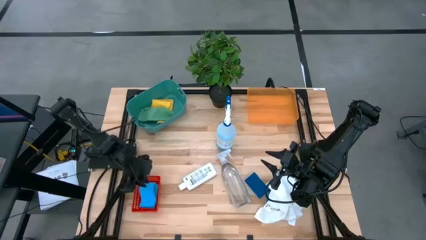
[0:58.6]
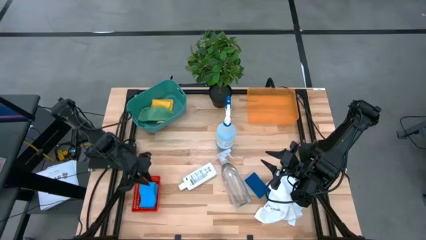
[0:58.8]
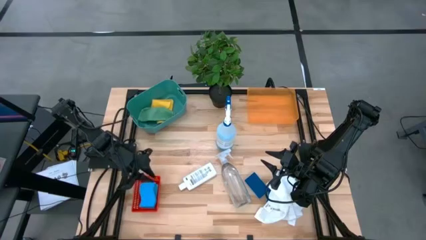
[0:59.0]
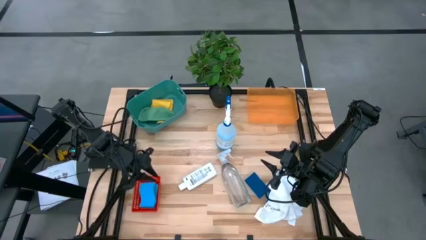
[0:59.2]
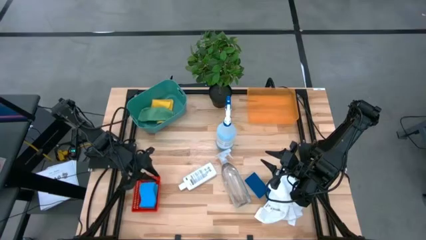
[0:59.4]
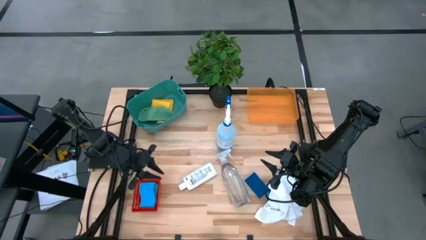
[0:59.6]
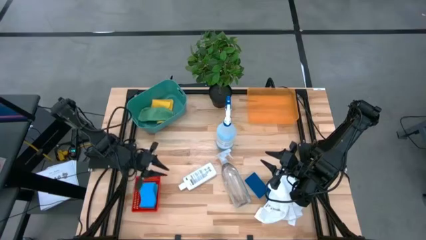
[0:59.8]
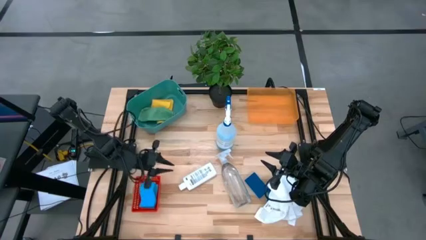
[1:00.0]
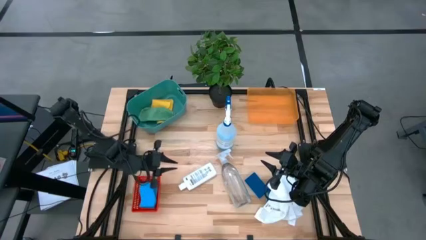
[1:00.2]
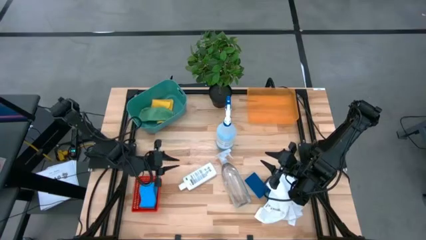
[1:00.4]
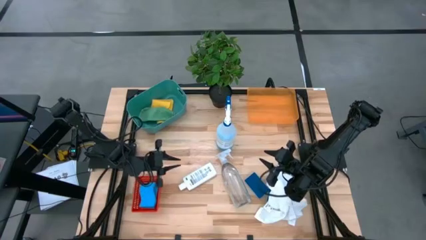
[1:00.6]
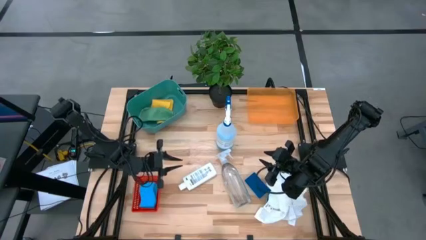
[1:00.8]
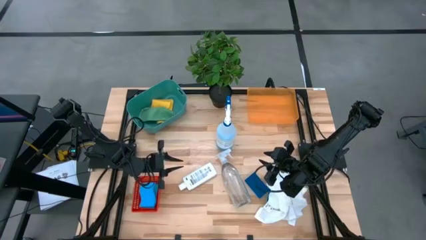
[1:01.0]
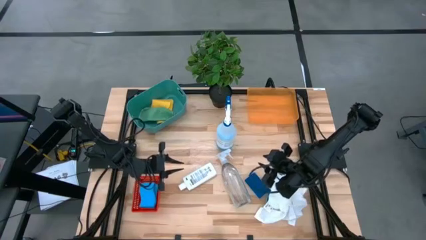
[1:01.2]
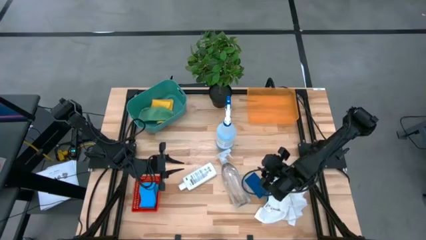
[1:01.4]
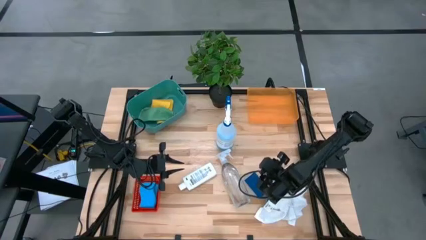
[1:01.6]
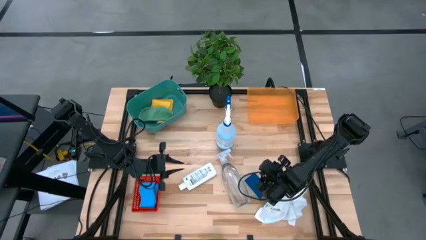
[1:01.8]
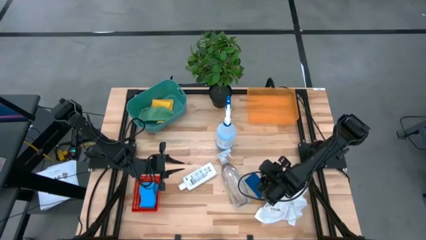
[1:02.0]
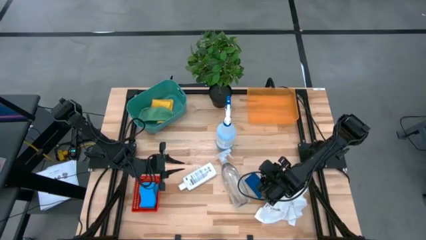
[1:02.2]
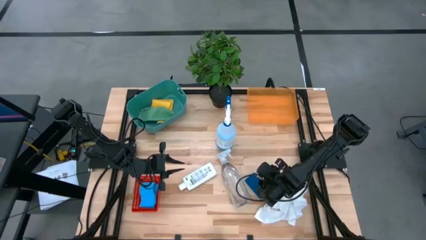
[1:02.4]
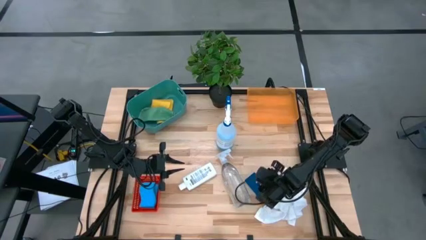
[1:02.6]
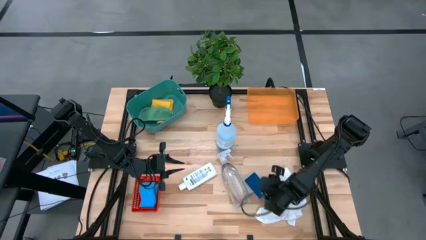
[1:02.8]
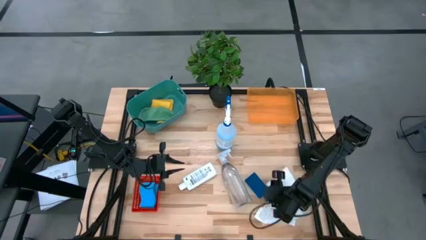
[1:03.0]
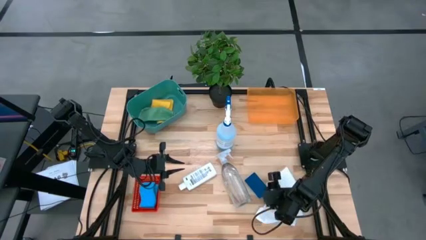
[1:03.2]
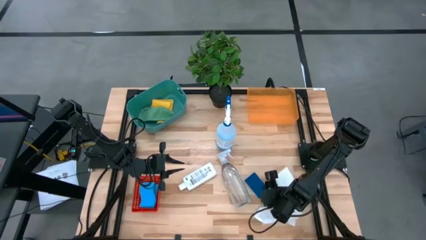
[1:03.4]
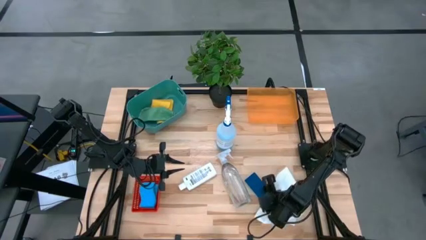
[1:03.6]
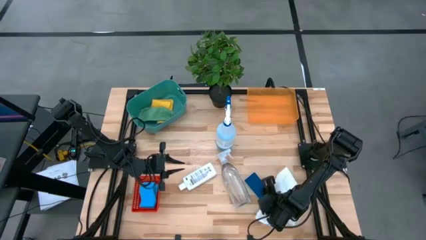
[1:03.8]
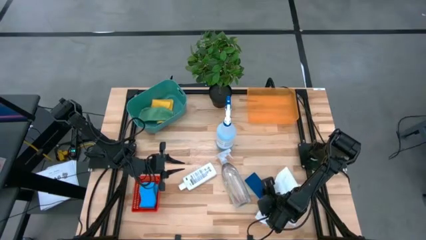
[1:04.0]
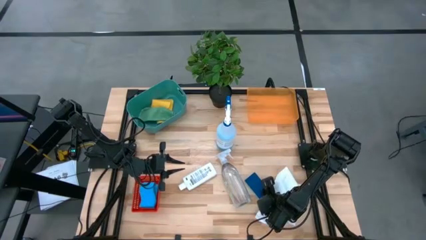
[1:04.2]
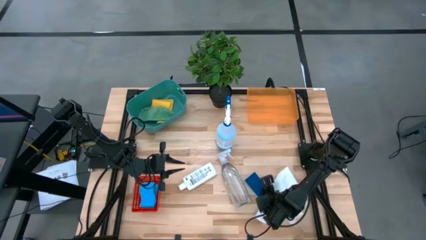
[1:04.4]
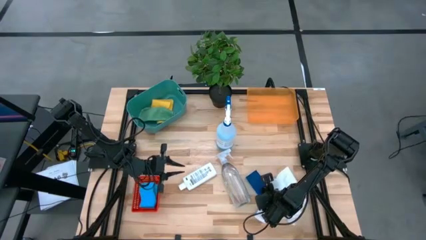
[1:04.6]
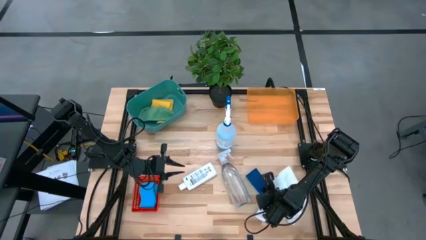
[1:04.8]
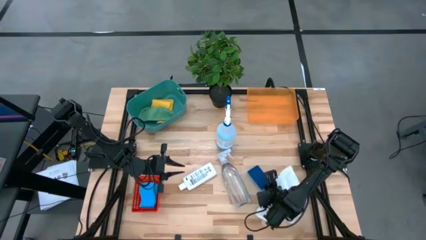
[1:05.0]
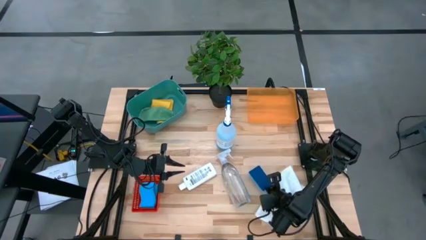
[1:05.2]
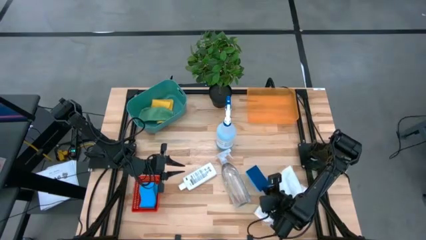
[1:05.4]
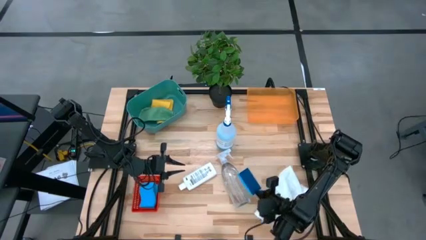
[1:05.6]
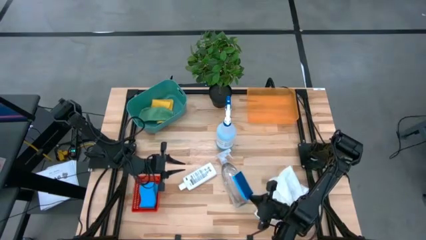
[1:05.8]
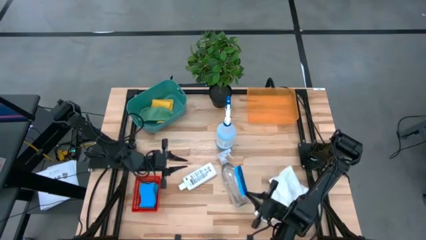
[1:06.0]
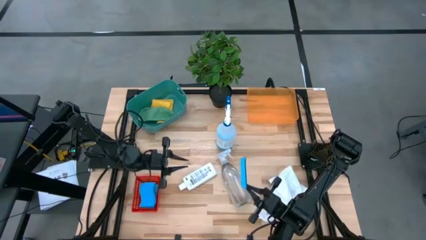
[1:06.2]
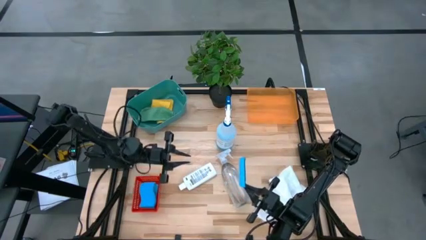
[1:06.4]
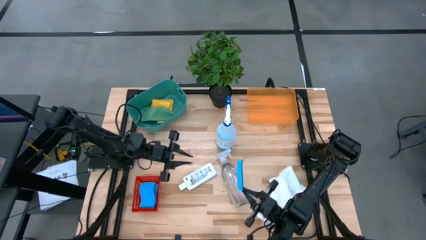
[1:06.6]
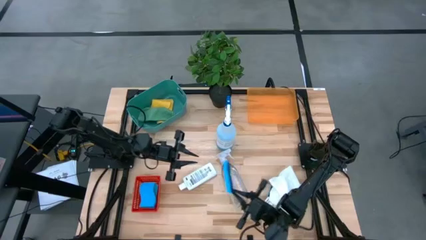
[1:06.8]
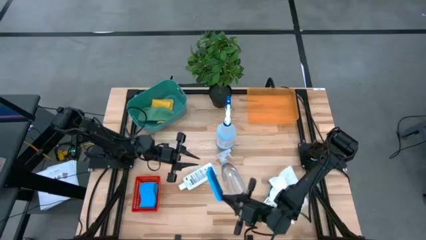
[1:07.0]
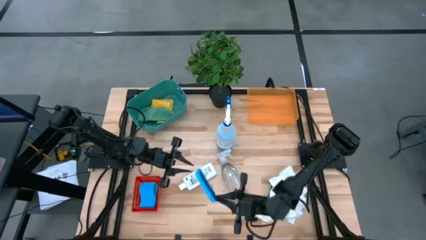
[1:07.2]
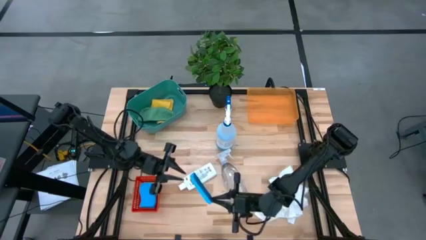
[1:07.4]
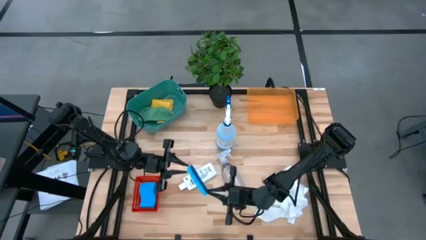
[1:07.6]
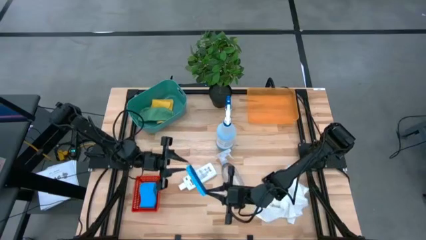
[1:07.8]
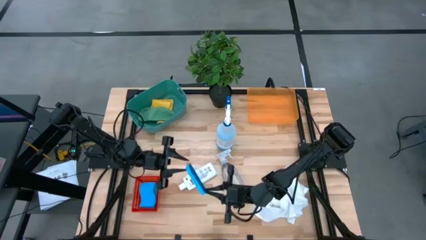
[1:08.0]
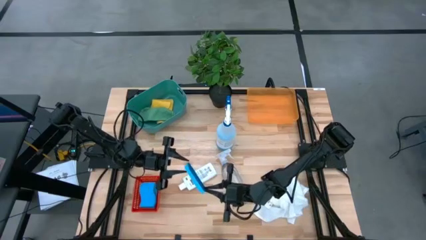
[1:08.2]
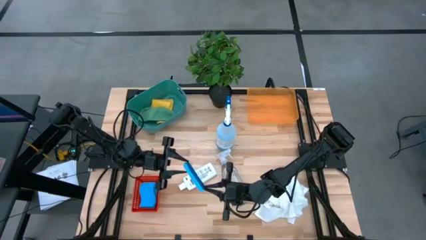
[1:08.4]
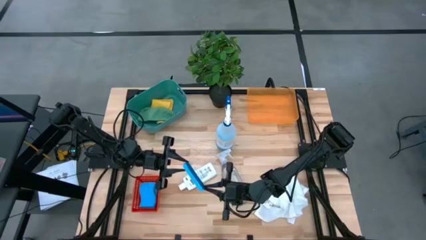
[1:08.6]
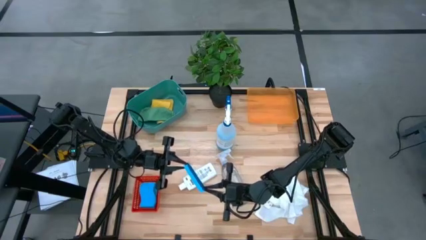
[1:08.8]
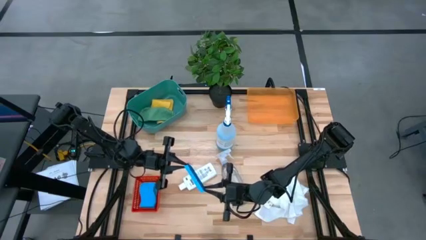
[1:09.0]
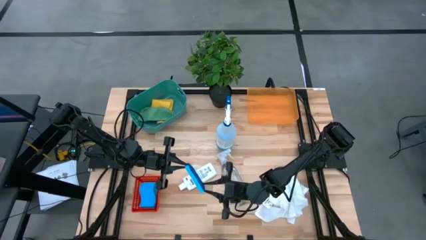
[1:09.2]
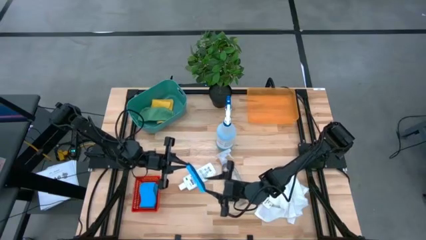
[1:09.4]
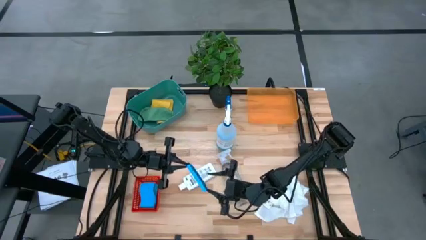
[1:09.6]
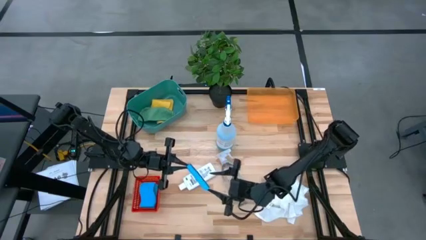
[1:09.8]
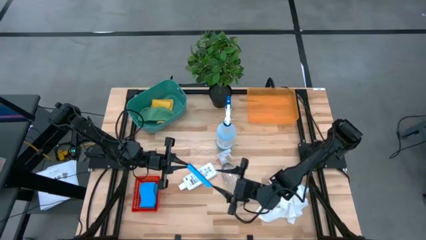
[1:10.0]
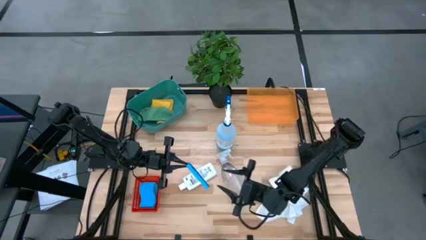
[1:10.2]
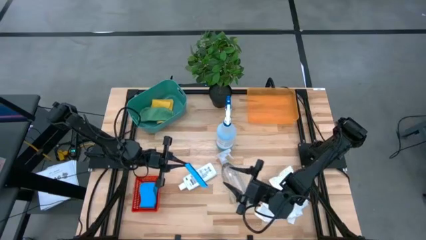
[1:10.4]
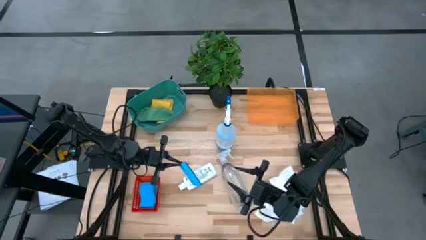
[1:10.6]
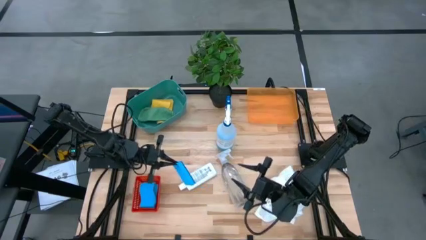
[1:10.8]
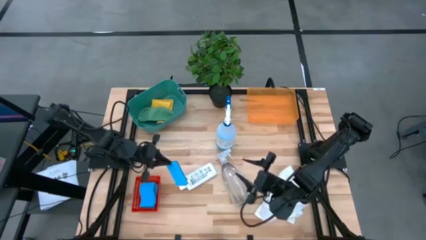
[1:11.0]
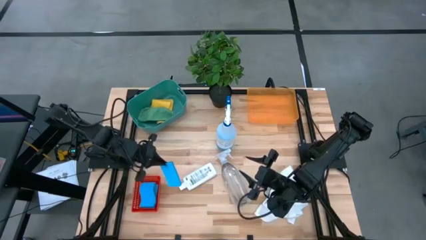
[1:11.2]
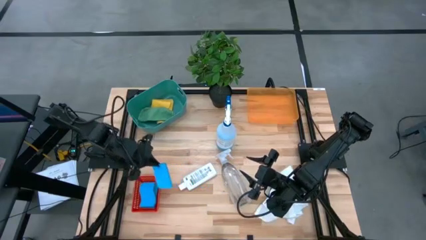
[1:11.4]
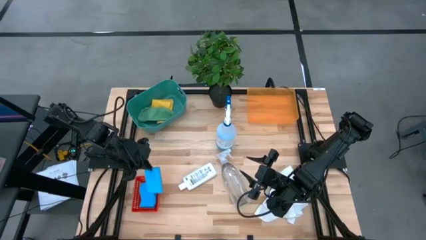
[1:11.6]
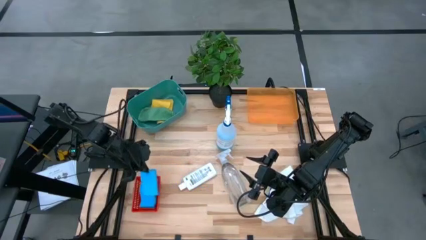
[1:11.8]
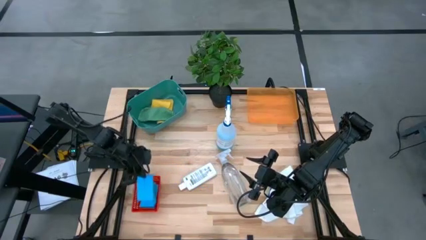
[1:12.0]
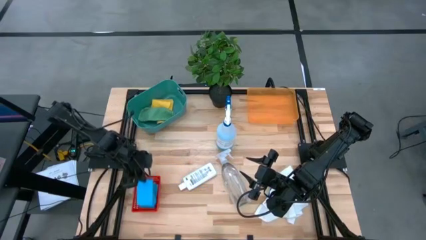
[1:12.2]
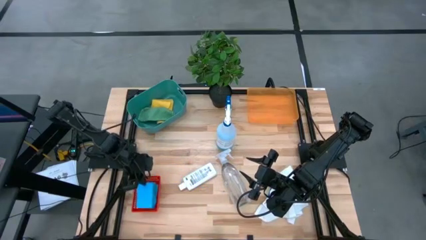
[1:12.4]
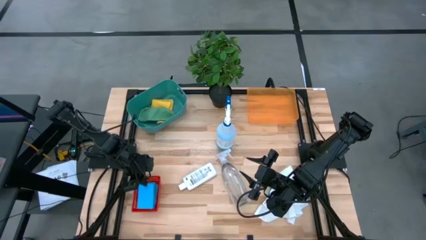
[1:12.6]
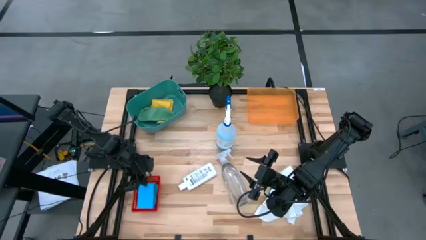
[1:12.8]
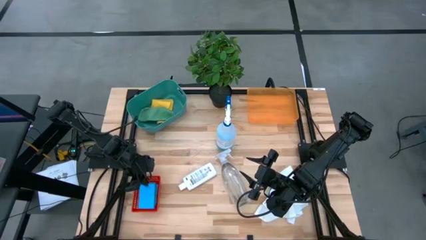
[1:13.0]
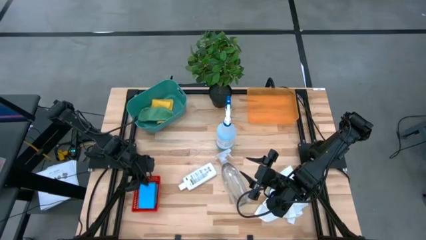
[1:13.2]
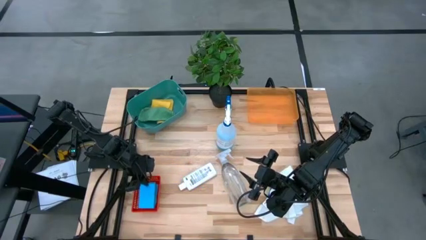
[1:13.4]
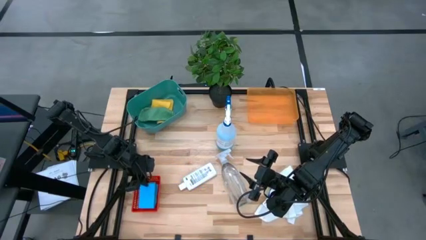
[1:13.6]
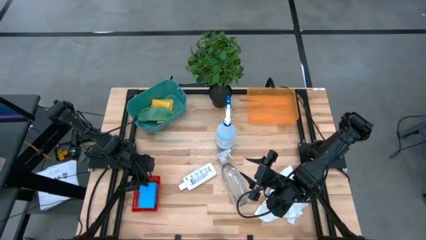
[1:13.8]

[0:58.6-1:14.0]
Task: Pick & Place Kitchen Items
Put the blue sponge into the red bin

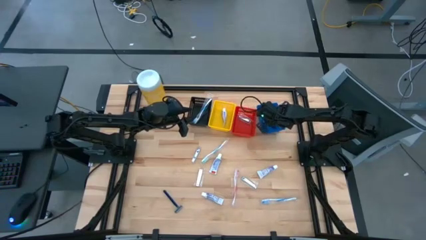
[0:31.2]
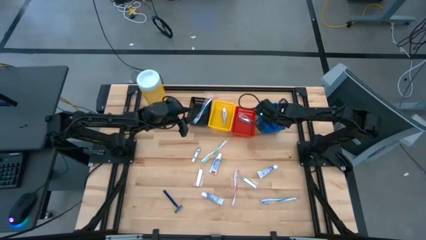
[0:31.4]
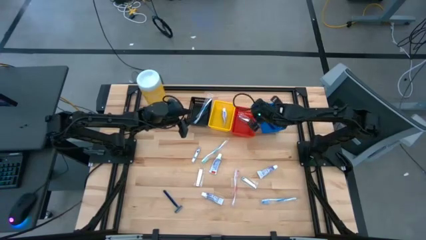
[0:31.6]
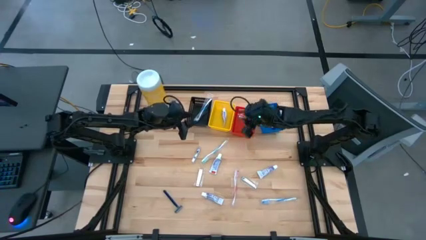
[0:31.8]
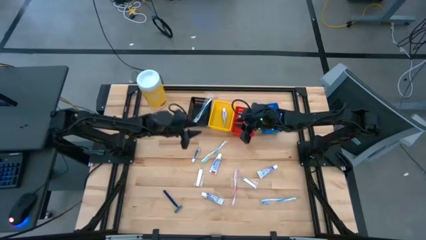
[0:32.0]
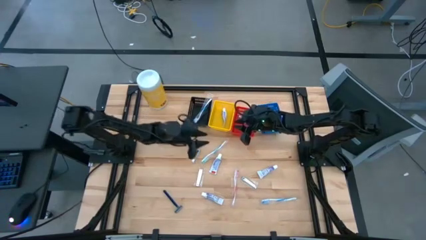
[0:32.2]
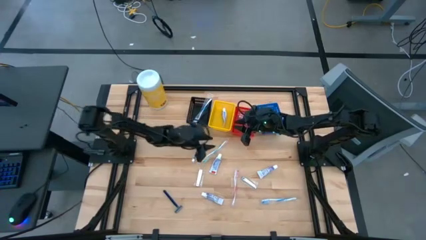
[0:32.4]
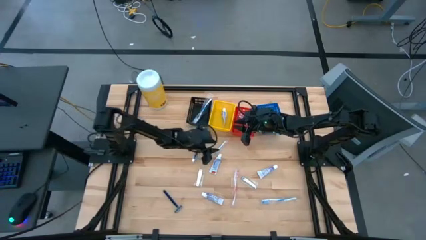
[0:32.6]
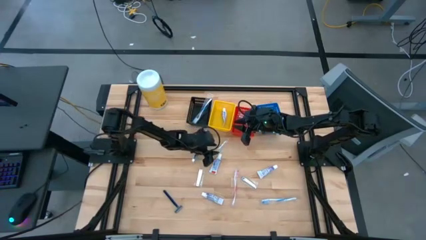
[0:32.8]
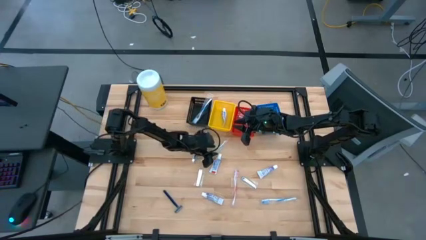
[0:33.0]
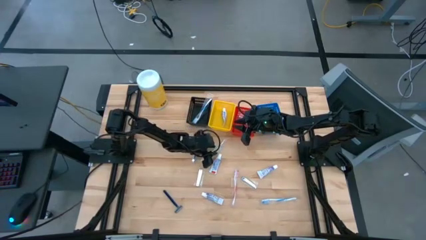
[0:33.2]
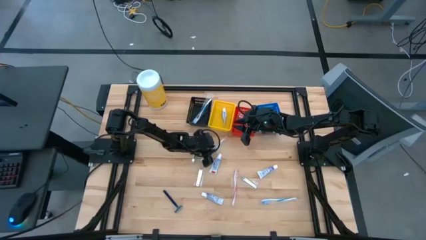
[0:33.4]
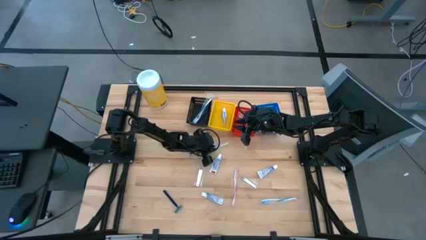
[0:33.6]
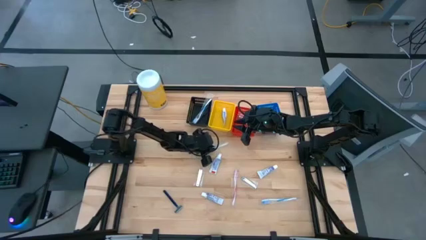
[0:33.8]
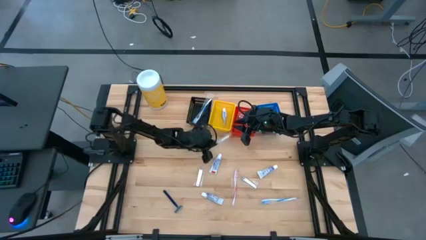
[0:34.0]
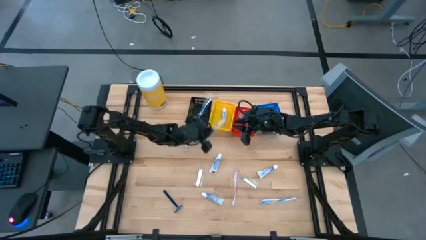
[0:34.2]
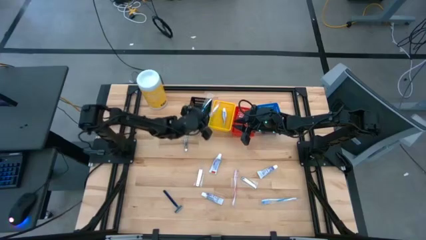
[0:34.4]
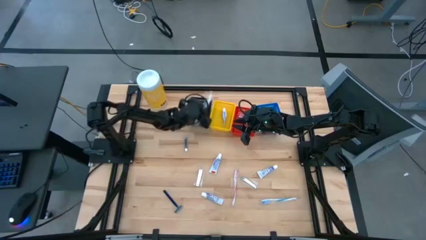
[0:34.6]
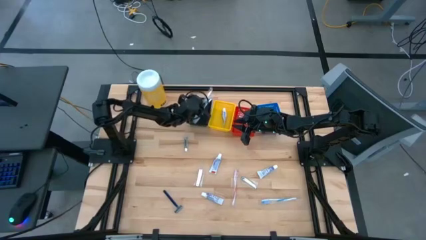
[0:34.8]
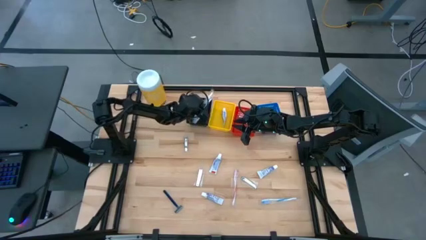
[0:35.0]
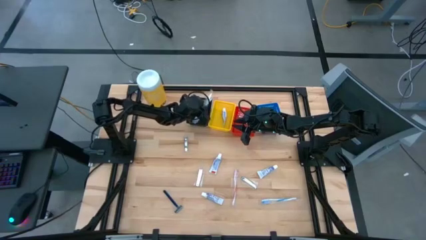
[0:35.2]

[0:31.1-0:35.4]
Task: Pick & Place Travel size toiletries
Put the green toothbrush into black bin
